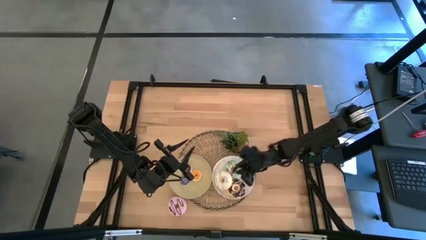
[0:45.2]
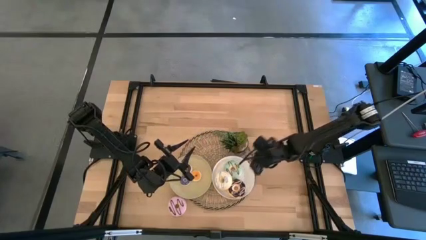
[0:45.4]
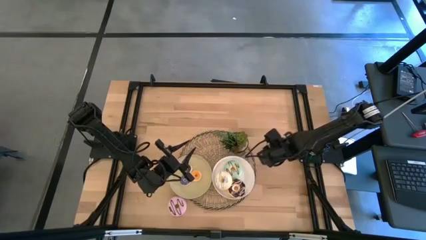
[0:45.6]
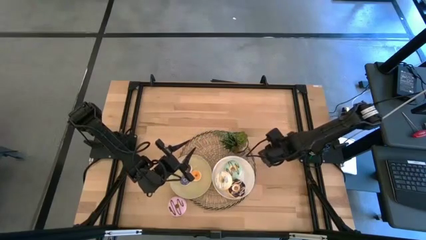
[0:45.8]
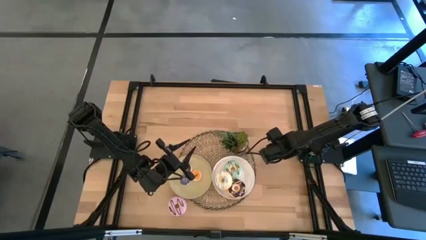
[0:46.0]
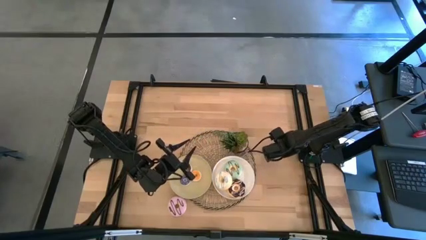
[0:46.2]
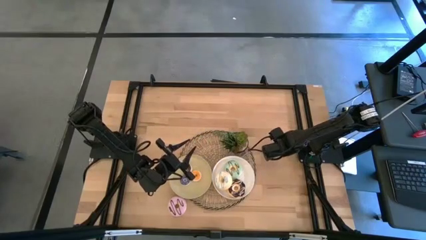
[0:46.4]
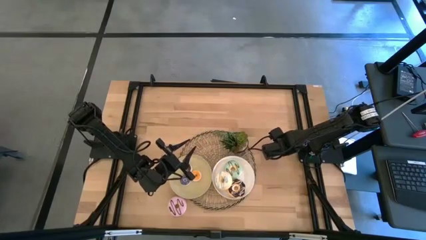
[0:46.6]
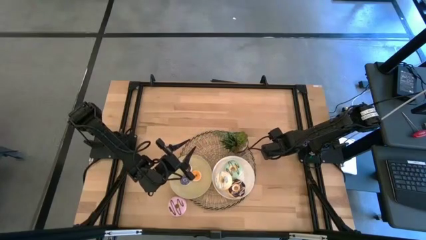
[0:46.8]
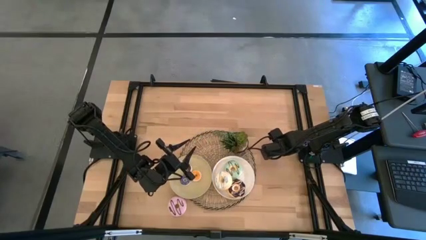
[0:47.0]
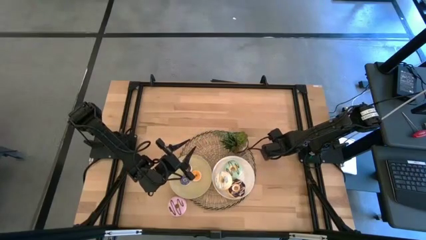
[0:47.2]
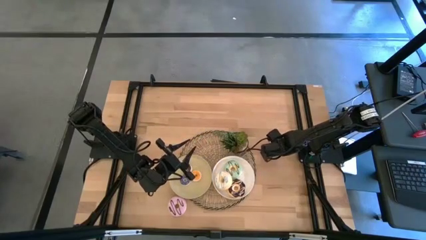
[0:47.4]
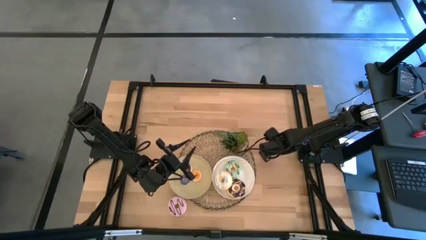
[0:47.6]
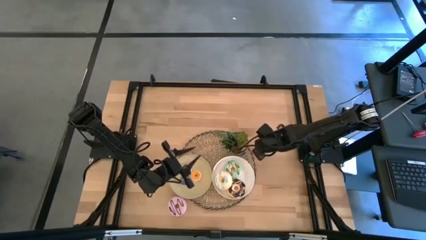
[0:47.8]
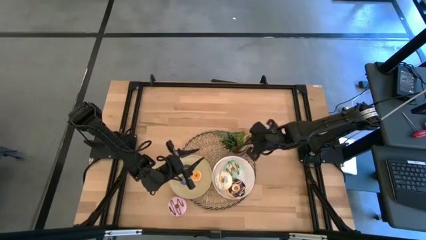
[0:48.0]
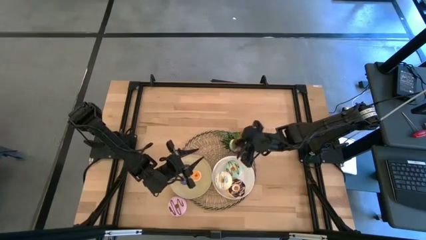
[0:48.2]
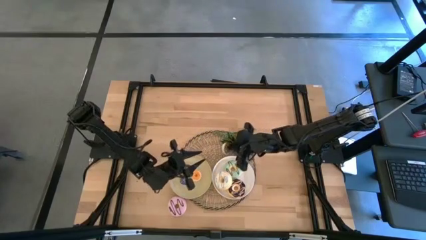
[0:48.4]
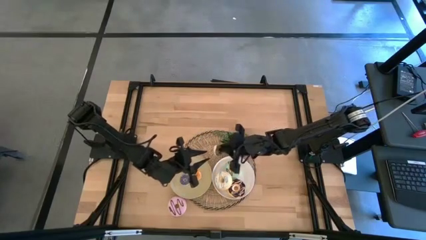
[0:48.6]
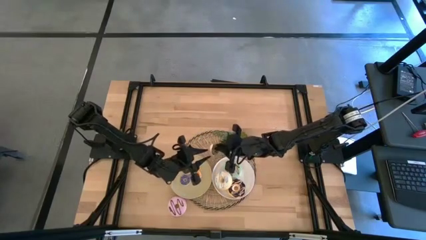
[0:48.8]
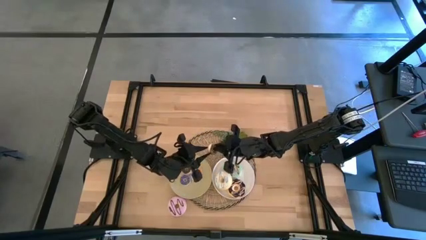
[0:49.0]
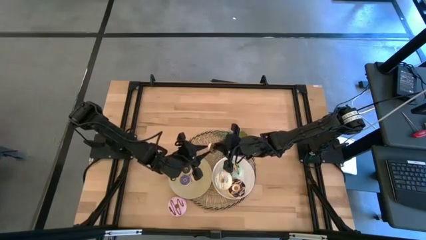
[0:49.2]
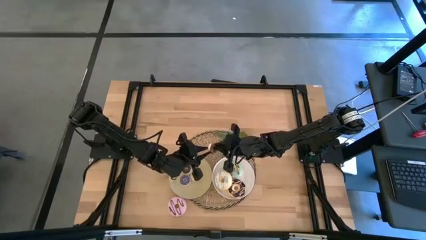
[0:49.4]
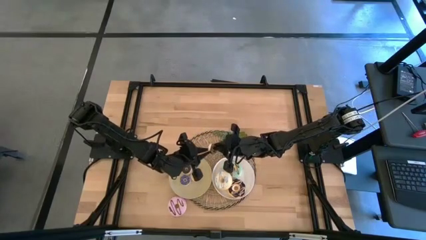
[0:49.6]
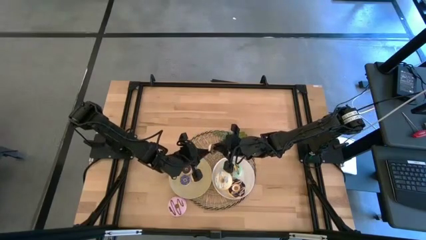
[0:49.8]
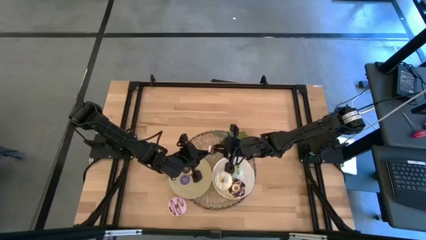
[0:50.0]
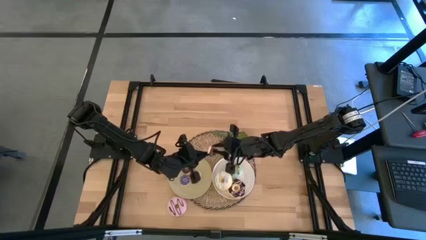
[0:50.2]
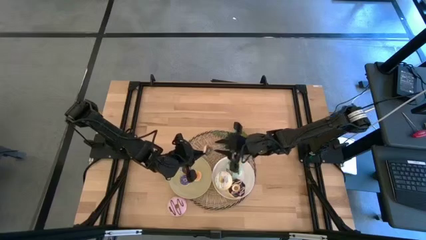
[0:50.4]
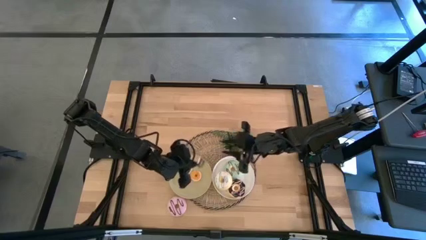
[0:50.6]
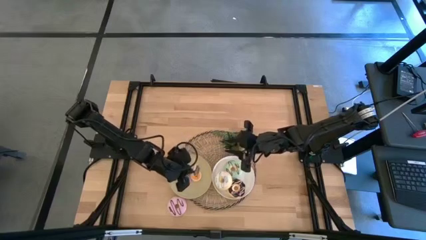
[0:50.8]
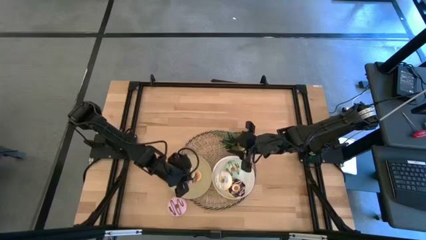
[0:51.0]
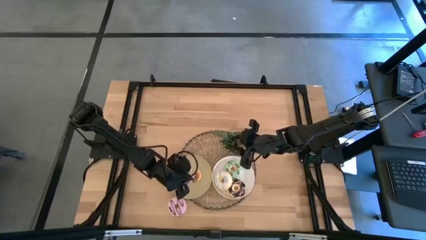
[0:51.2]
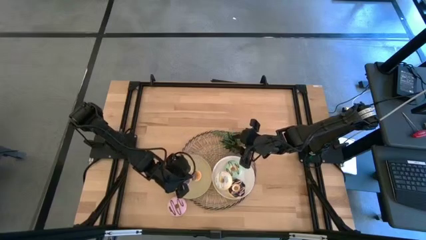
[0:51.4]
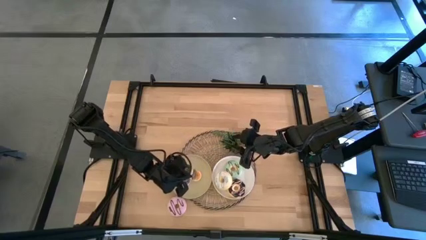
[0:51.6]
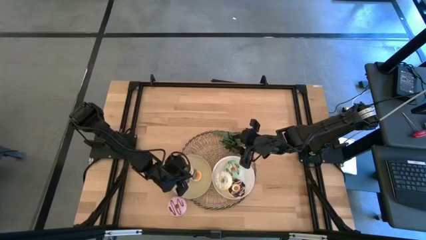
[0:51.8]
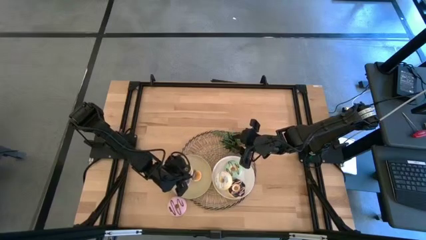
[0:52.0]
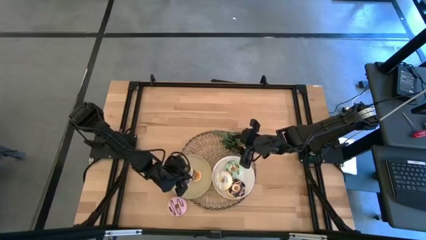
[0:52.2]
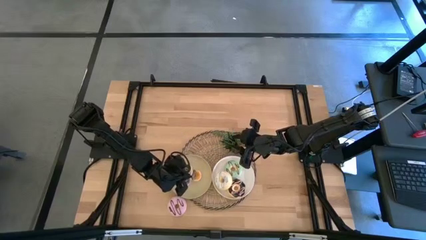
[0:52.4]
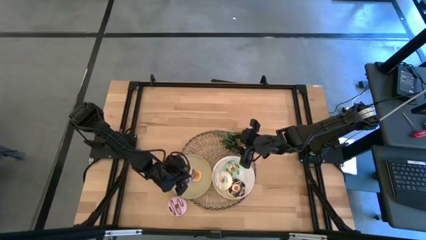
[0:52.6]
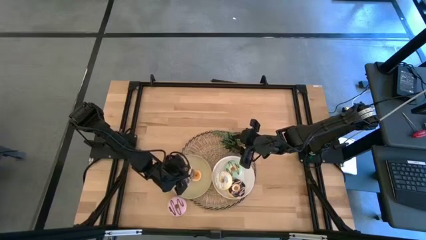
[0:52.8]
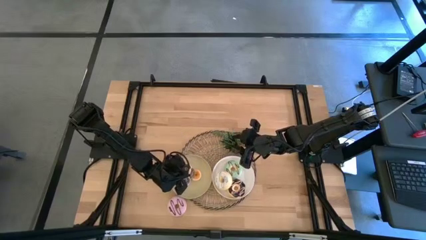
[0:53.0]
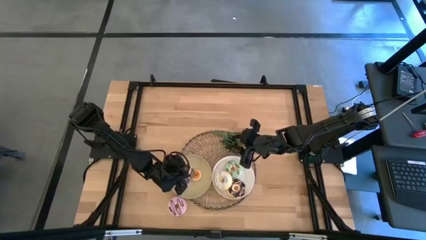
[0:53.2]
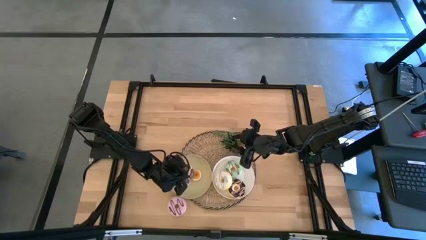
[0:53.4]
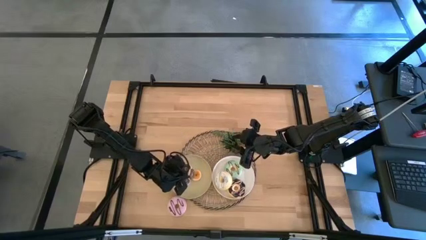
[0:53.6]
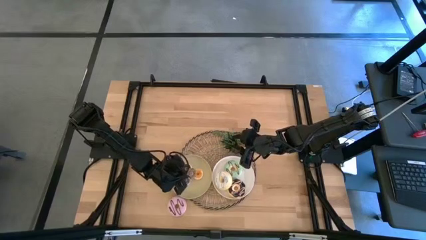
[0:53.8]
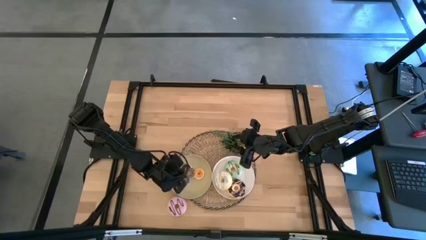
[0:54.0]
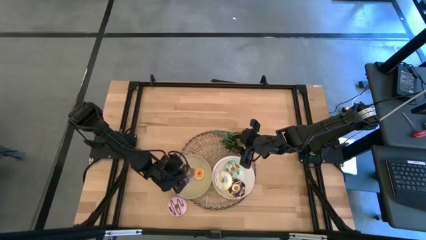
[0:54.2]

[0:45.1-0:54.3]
Task: Pick & Place donuts
Put the small brown donut on the brown plate

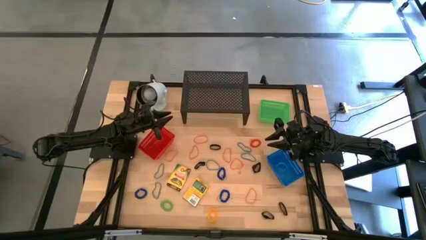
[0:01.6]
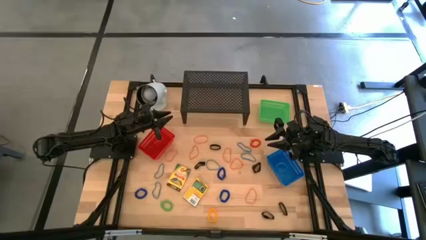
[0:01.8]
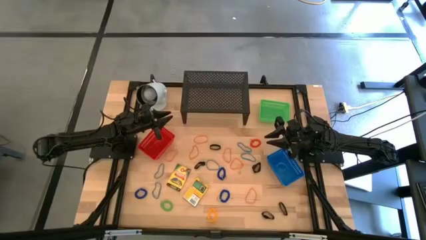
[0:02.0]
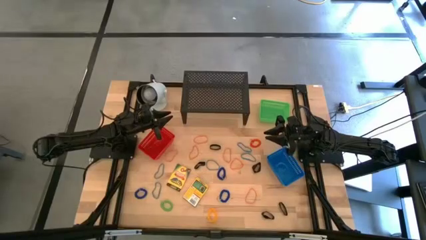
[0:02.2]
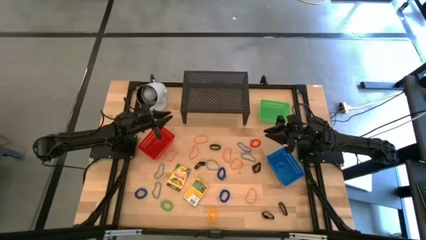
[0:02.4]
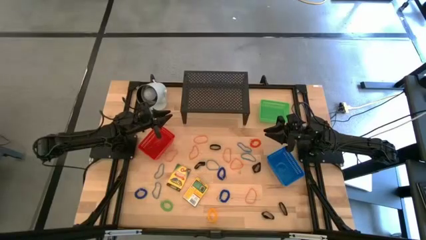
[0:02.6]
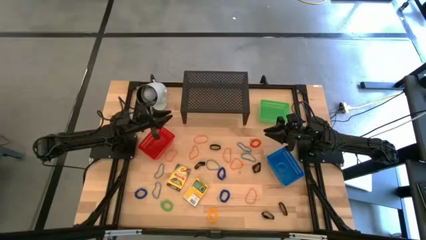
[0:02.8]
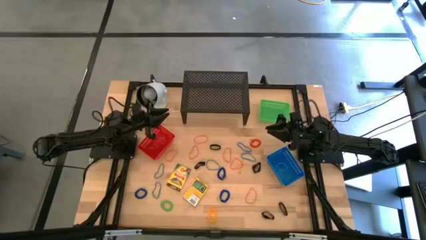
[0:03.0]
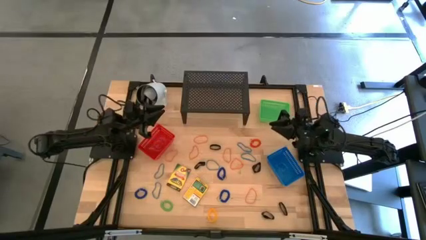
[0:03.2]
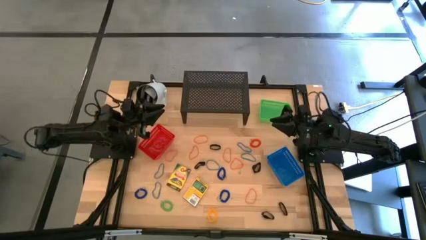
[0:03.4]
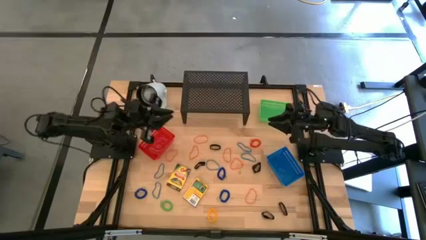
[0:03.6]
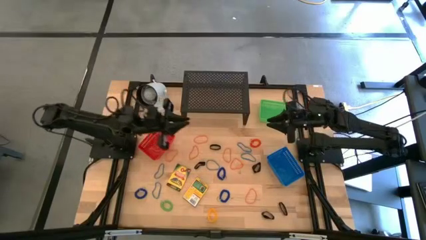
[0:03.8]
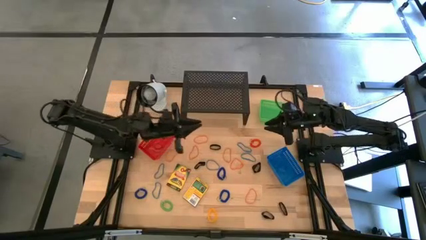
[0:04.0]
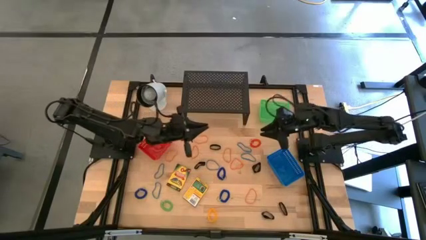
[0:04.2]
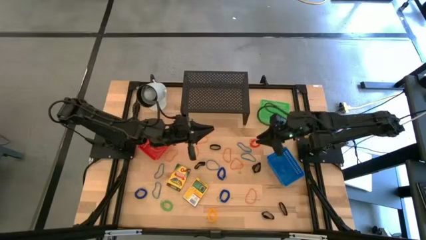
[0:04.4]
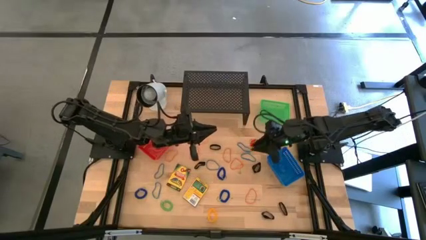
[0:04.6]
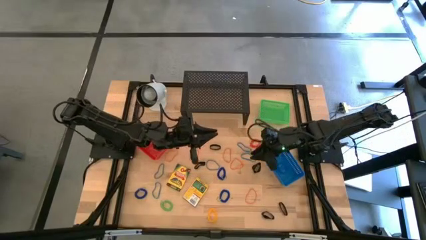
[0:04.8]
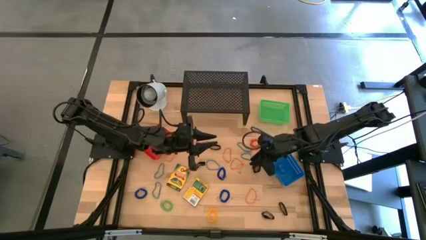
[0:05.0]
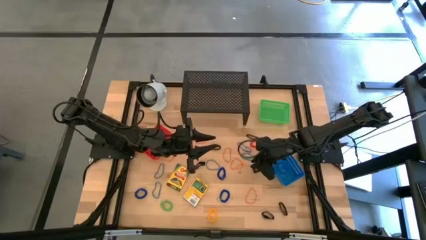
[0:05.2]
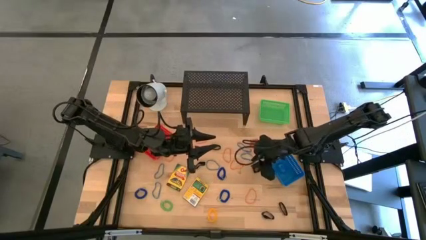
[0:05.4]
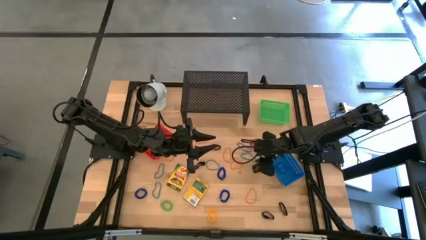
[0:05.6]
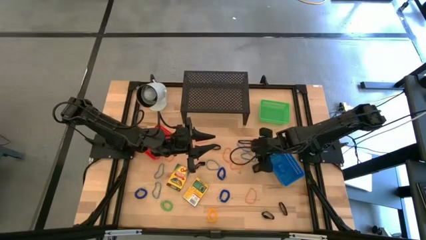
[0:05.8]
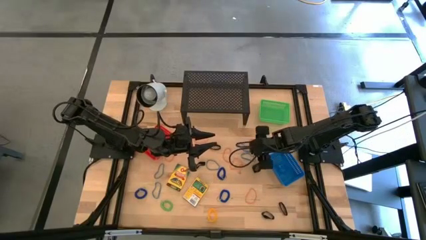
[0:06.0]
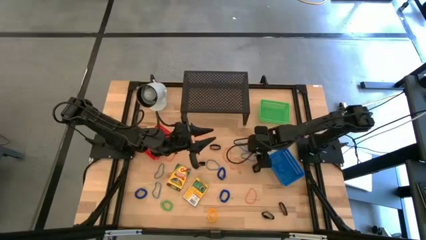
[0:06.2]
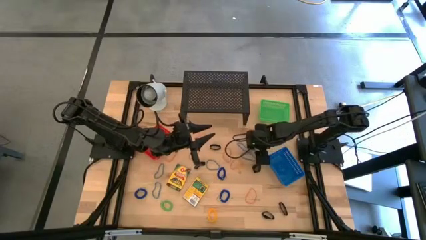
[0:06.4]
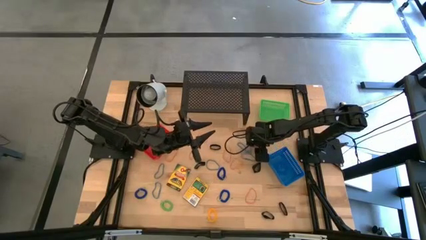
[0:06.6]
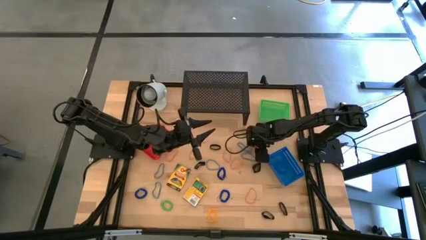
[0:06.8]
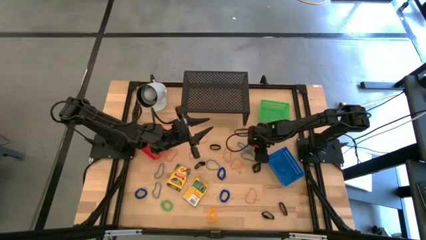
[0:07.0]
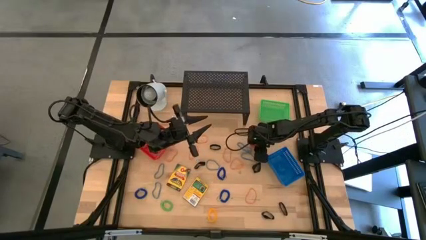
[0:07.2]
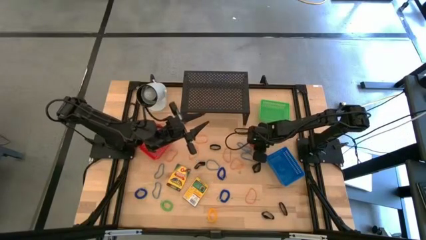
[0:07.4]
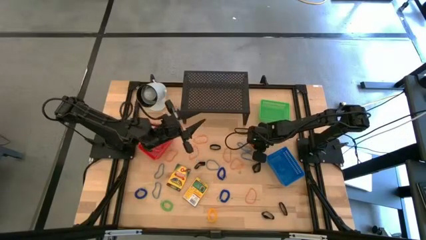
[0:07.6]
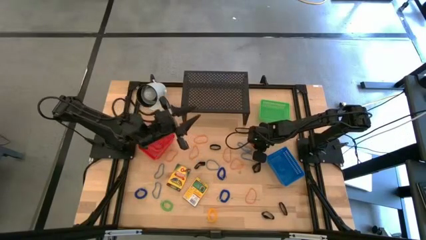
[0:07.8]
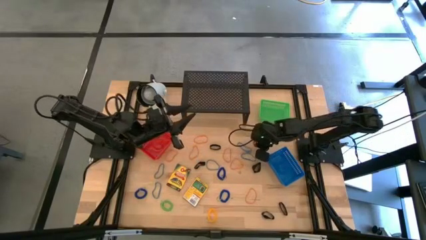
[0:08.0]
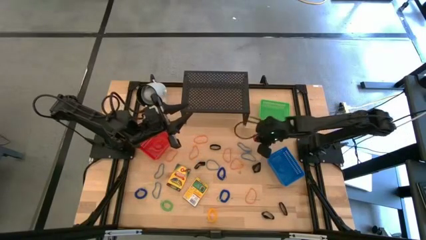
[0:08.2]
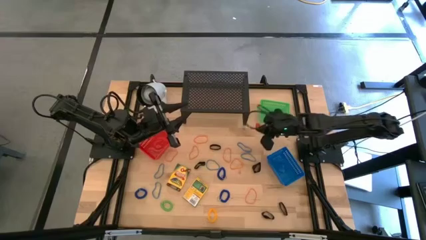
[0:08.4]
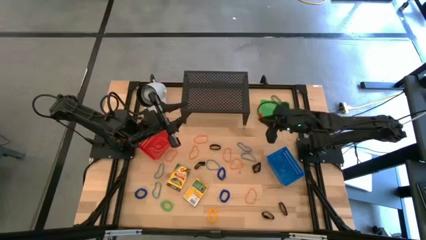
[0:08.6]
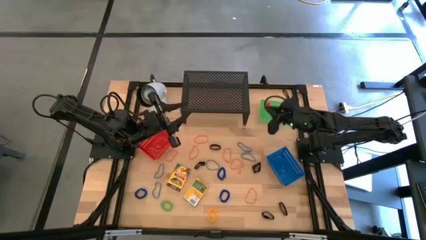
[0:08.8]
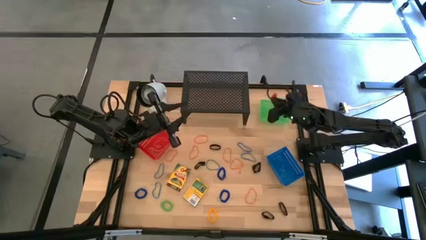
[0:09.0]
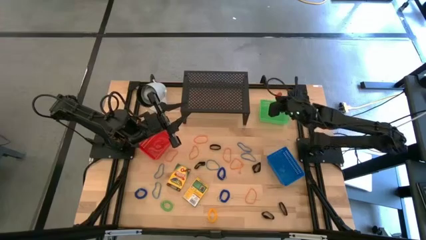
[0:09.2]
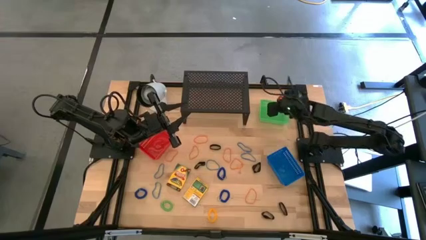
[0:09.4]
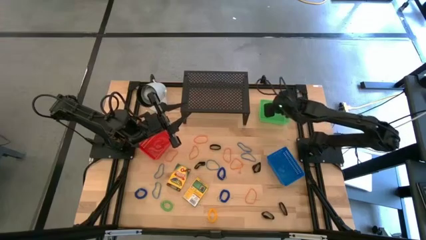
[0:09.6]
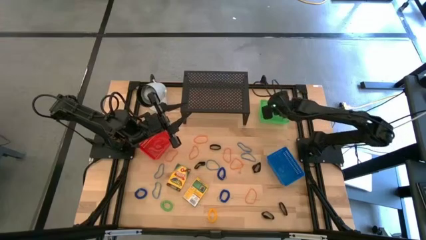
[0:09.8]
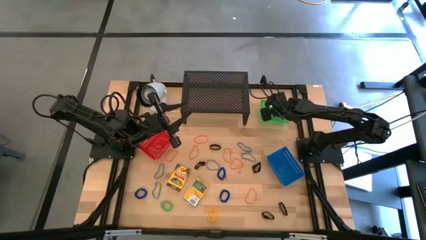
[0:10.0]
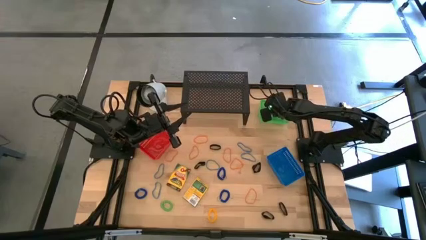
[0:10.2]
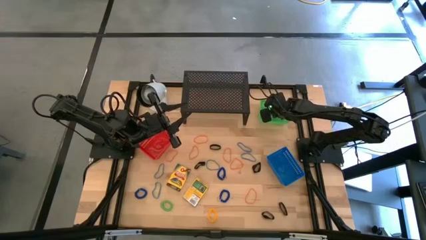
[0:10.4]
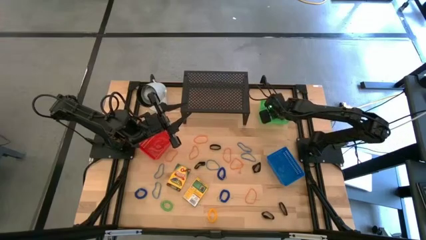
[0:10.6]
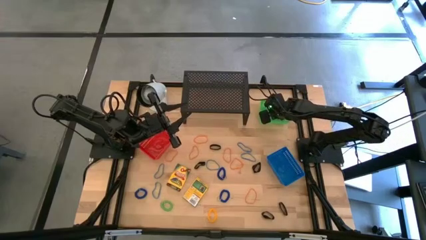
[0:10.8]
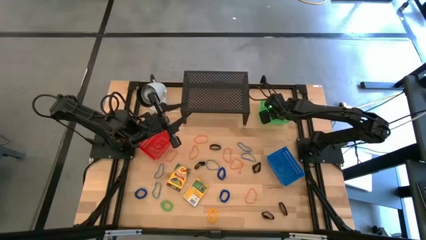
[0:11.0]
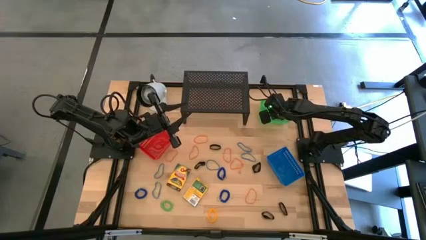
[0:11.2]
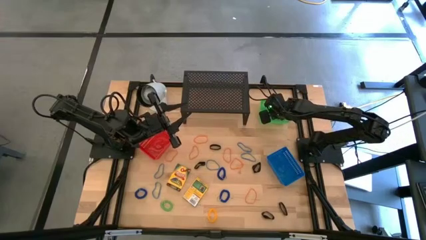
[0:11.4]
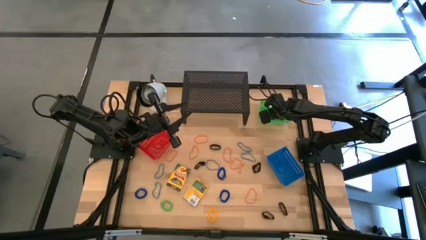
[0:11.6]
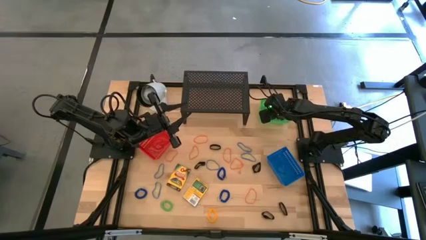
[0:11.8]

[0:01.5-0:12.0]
Task: Pick & Place Office Desk Supplies
Put the red spring keychain into the green bin
